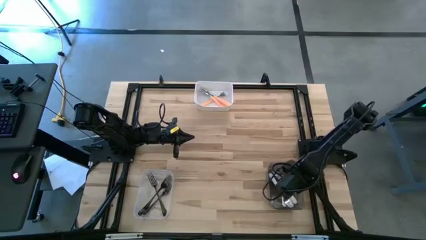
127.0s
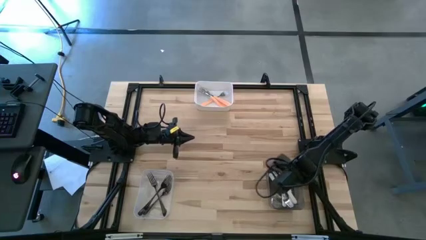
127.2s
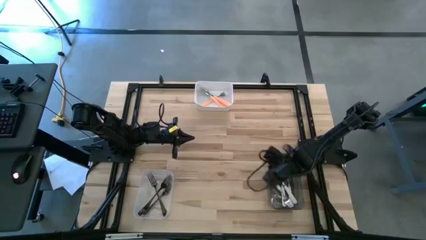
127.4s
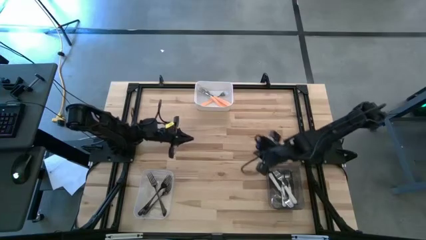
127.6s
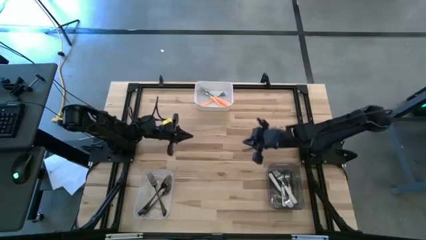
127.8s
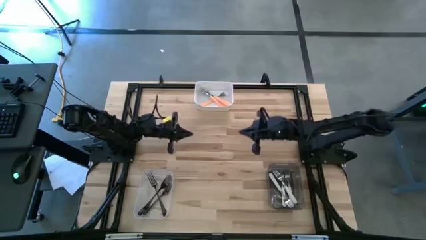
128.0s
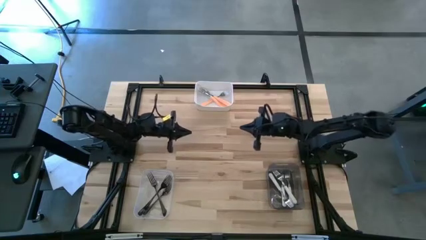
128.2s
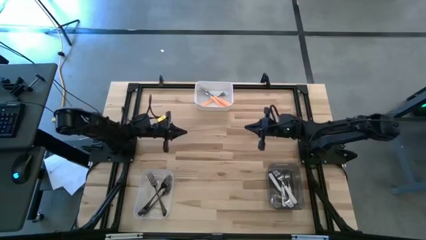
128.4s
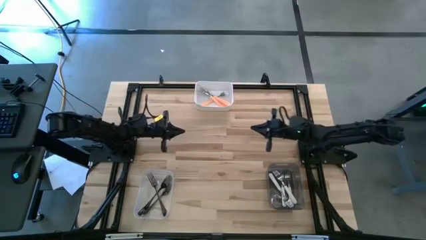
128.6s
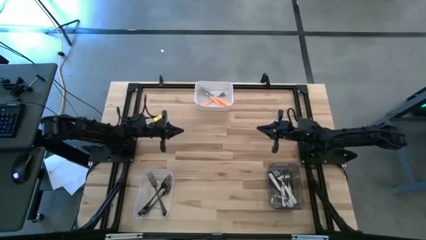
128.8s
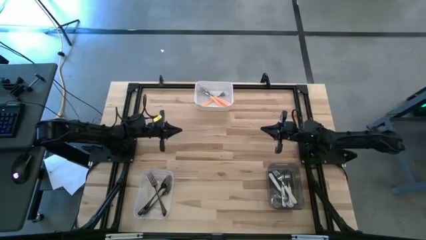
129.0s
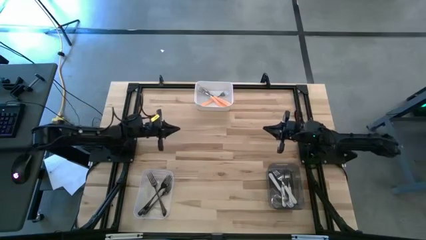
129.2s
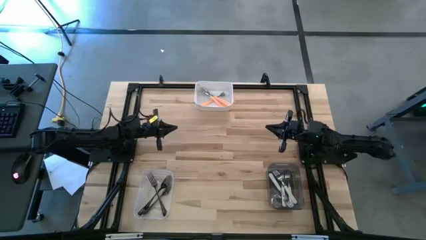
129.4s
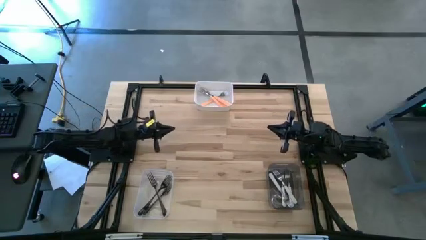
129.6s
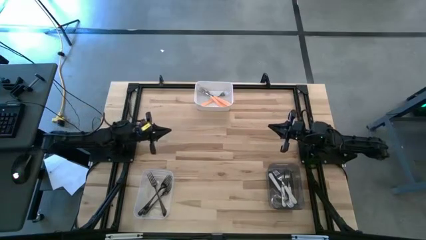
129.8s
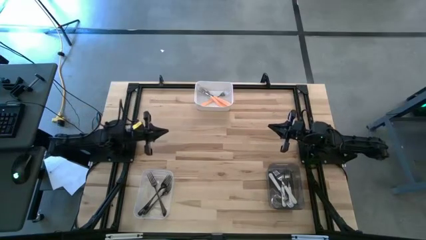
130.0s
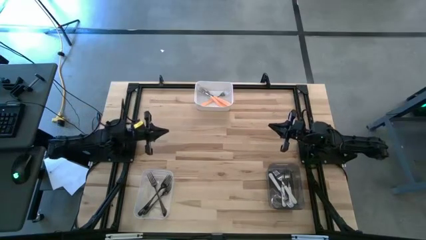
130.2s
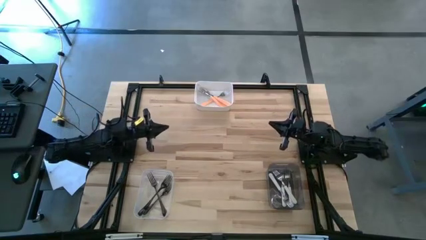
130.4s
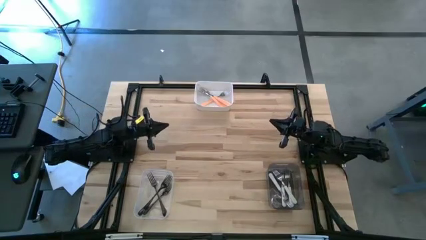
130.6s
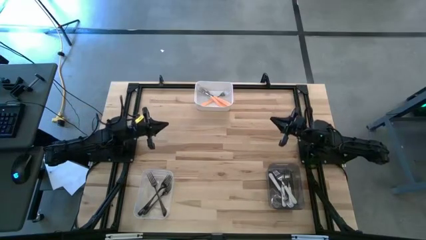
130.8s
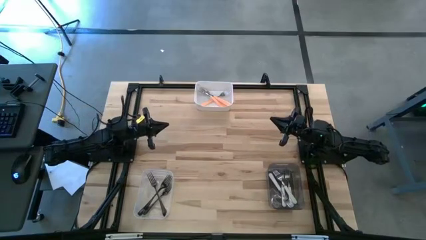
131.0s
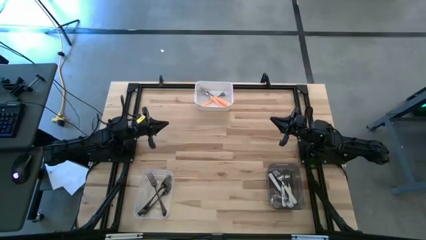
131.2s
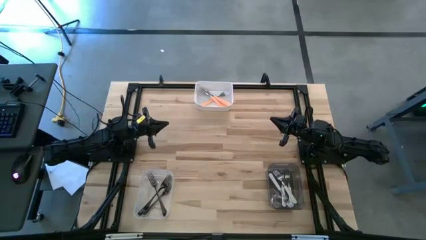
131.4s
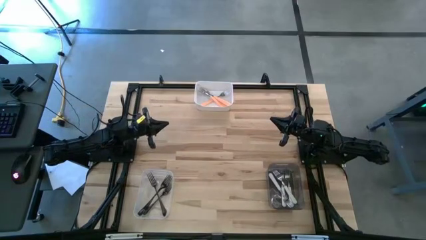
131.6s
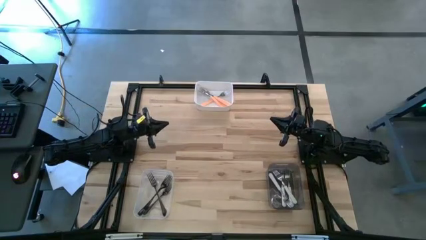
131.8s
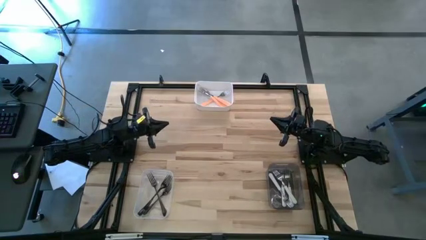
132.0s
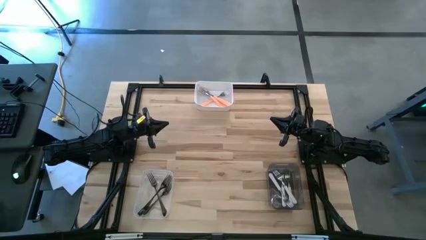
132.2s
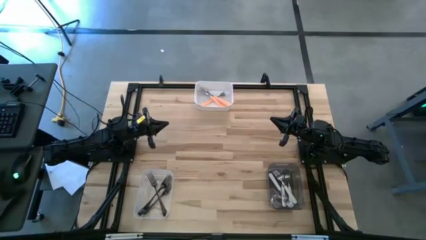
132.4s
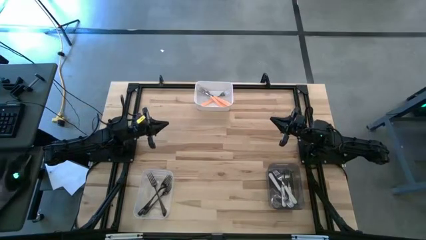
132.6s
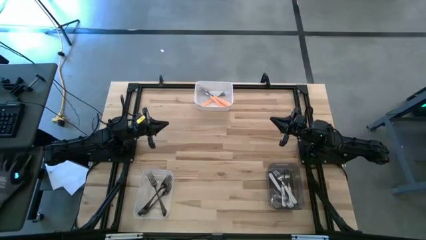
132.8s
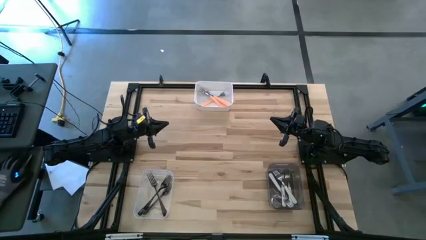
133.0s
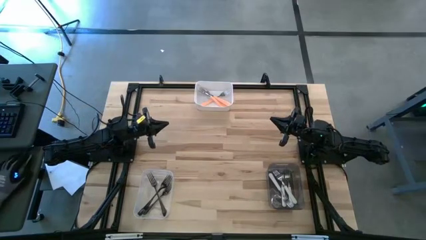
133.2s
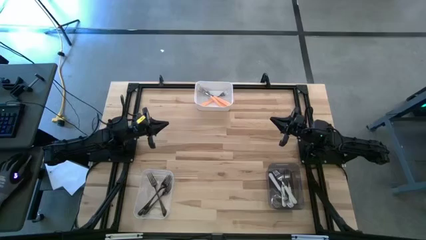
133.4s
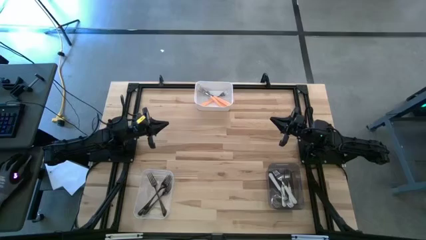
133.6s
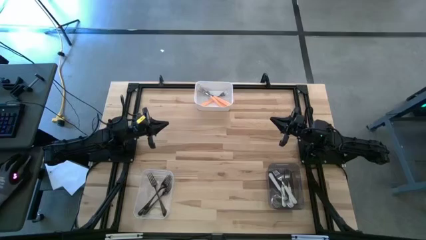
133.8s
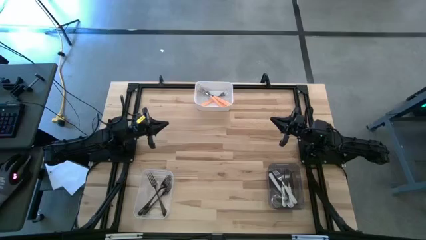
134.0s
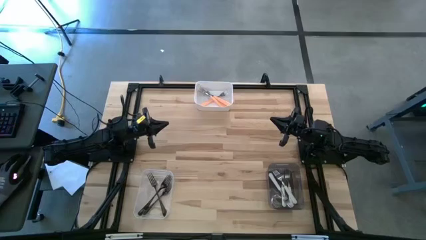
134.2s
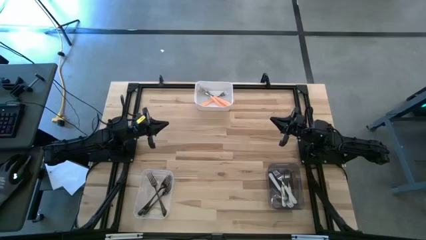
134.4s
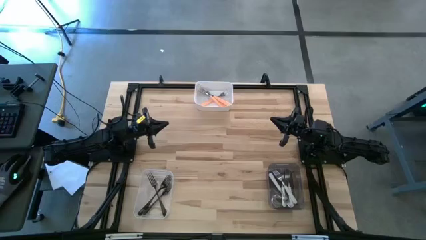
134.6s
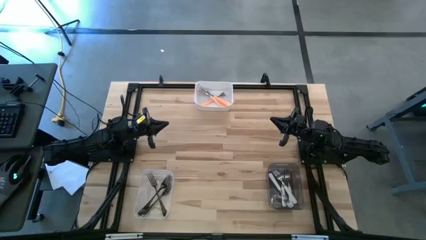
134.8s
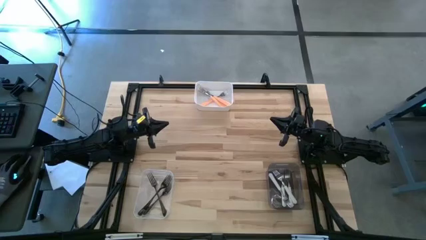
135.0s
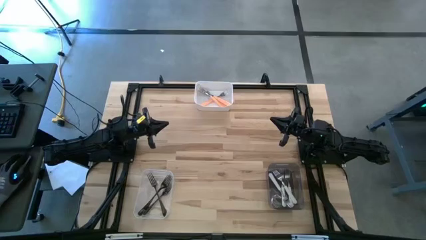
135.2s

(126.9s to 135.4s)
Task: Sort silverware by color (type)
Return to Home Position

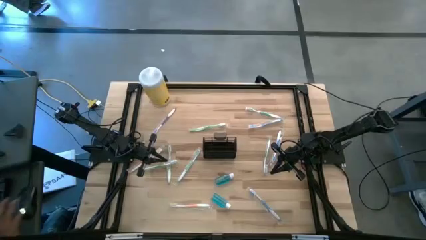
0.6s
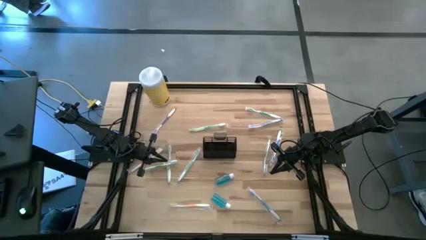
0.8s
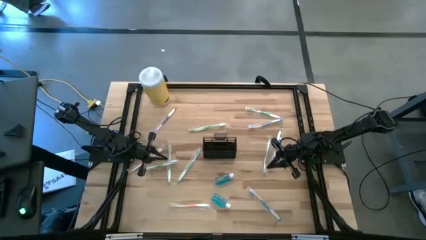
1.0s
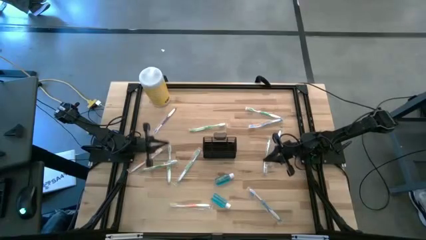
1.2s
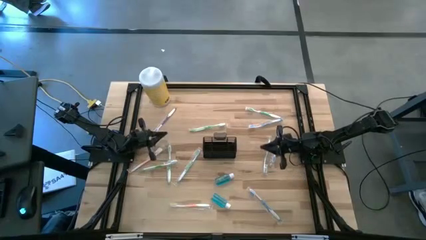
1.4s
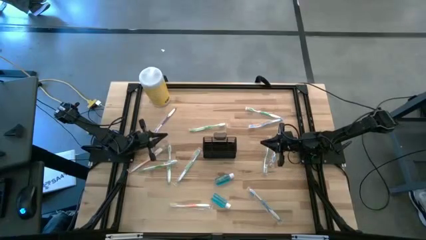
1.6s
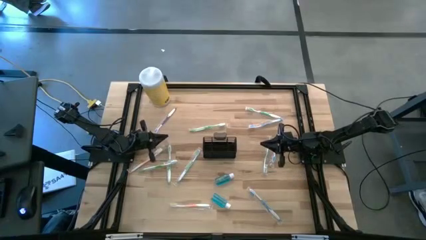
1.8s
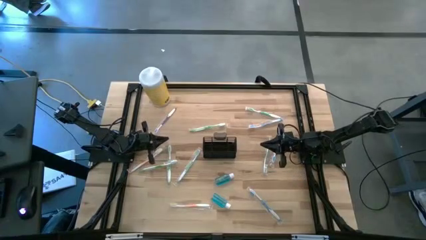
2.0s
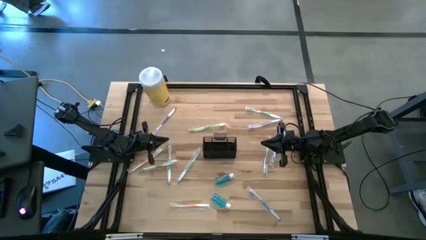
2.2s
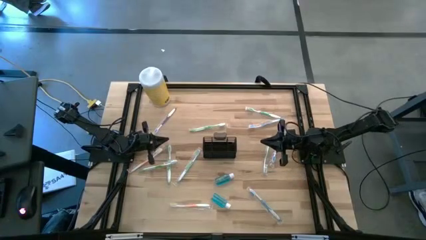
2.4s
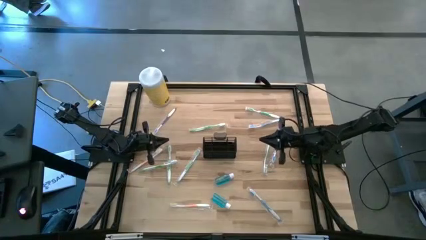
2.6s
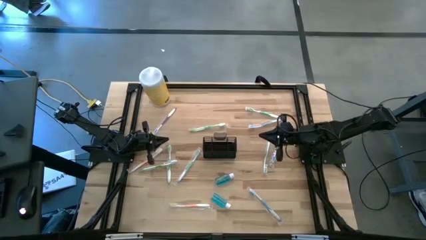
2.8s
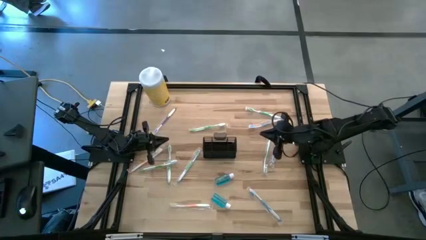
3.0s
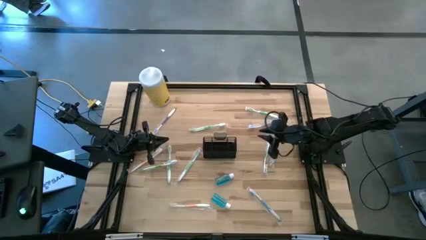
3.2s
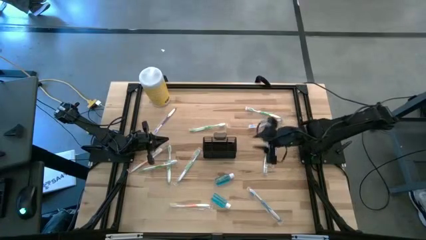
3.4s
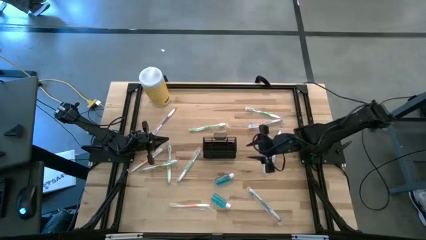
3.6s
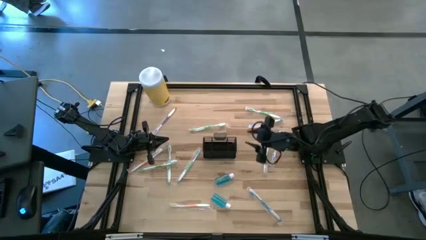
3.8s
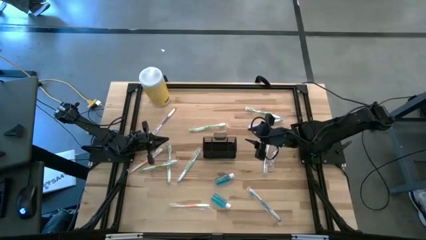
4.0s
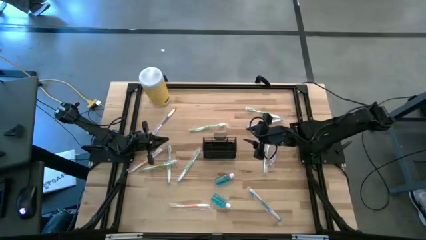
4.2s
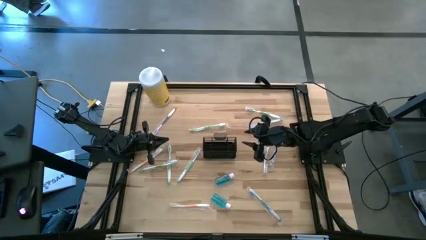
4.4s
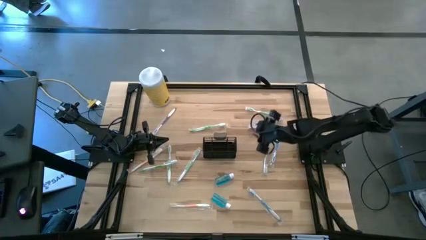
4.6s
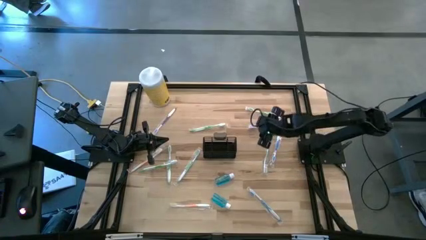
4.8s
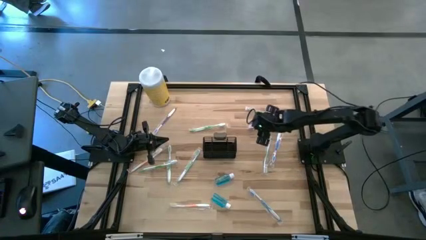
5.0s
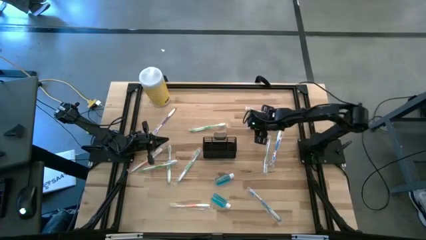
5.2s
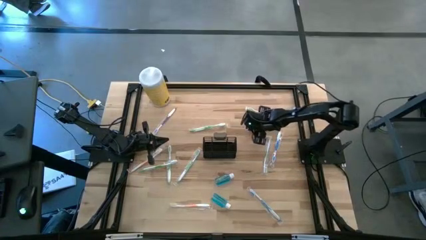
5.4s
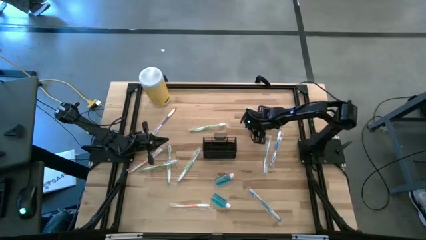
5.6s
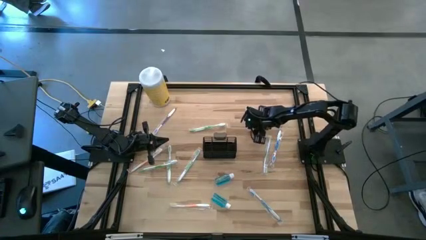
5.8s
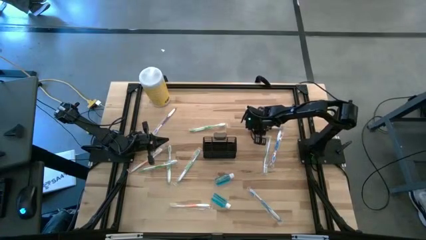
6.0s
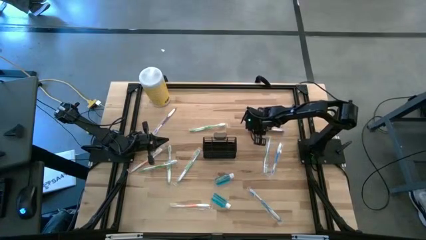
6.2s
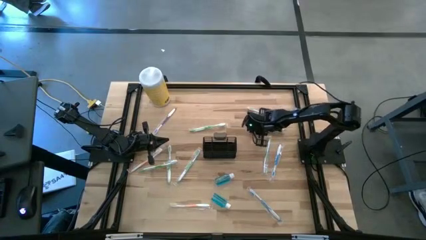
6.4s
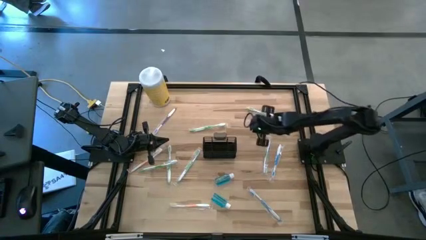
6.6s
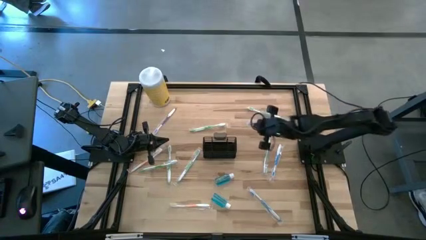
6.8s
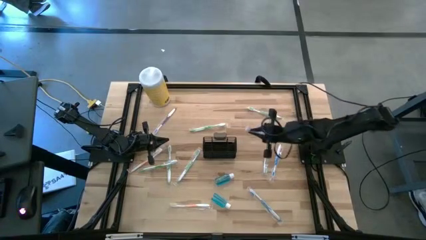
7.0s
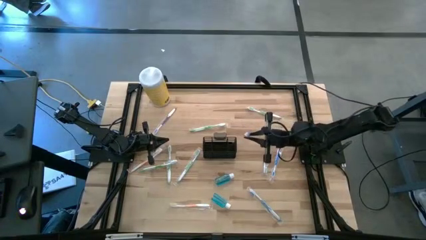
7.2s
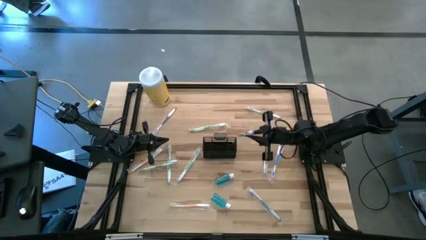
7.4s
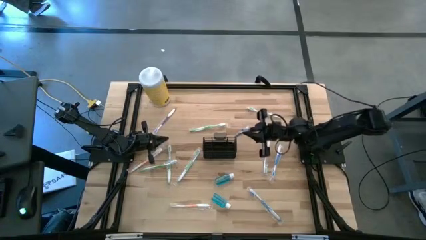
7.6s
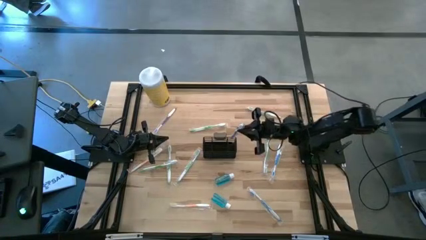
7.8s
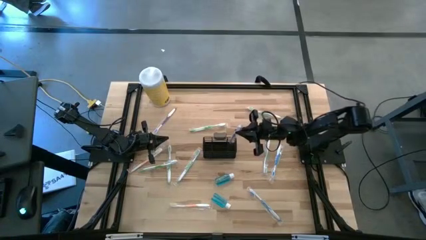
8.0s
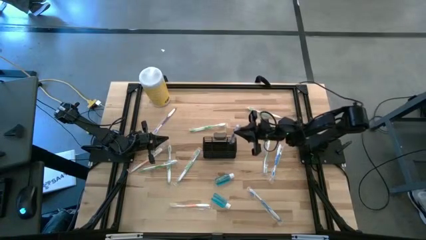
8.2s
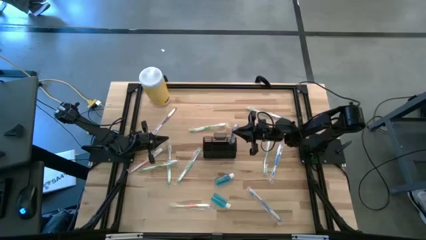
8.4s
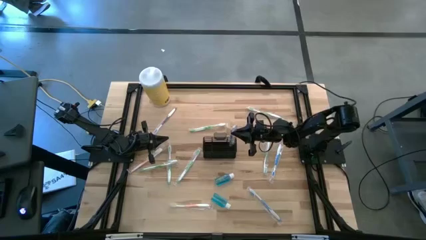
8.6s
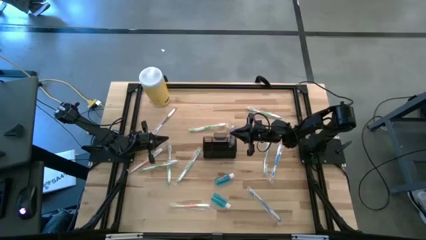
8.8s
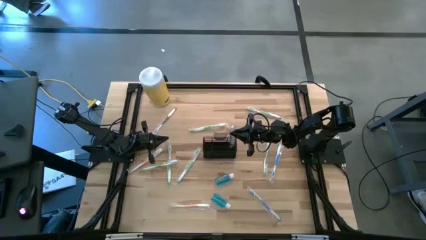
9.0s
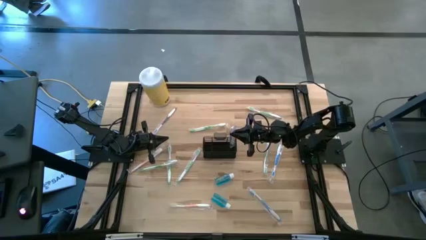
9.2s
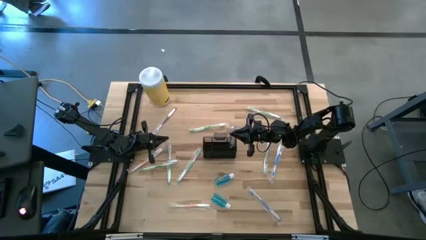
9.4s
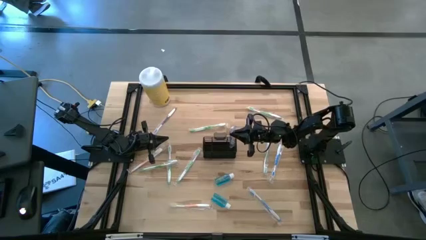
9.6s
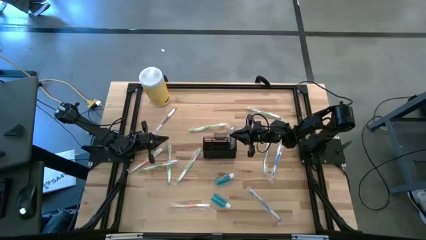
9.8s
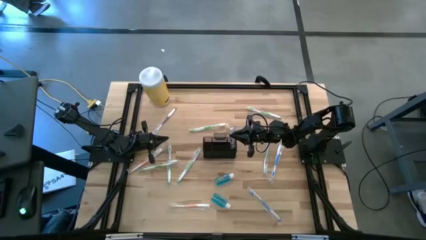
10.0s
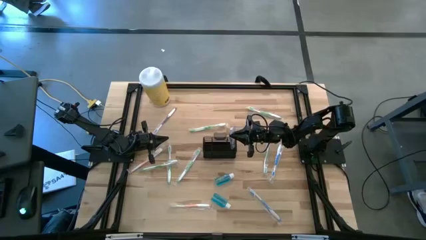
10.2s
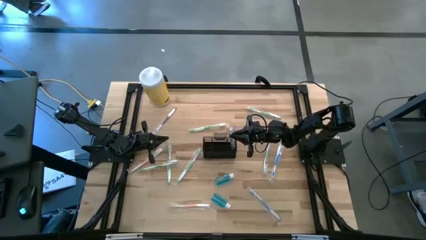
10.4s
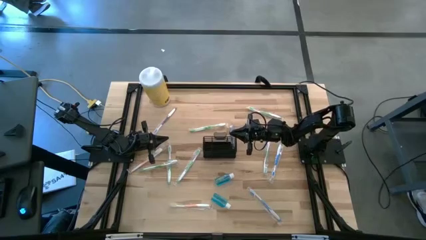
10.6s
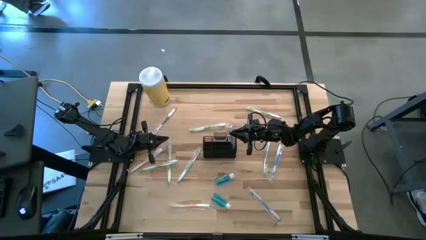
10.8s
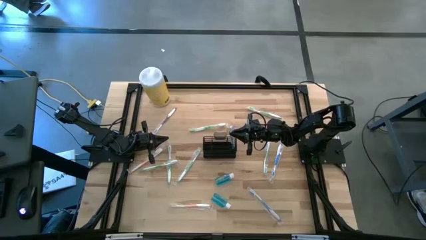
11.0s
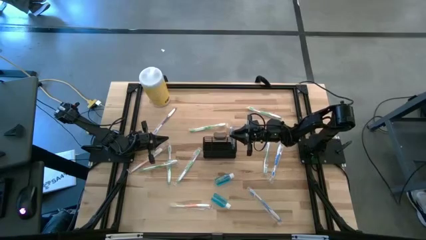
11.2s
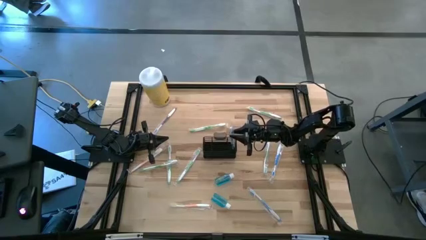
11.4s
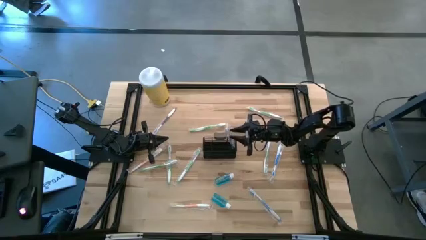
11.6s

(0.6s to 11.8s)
Task: Pick & Place toothbrushing station
Put the blue toothbrush into the wire organizer
